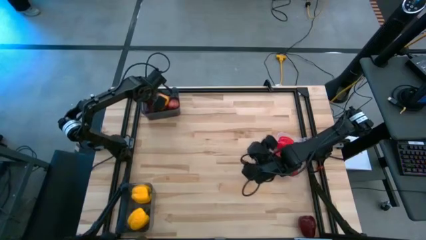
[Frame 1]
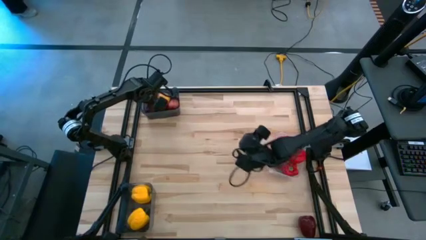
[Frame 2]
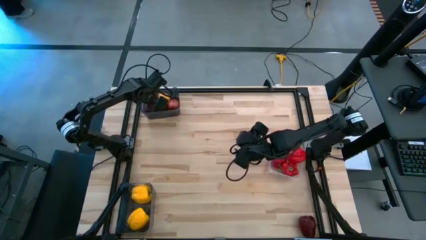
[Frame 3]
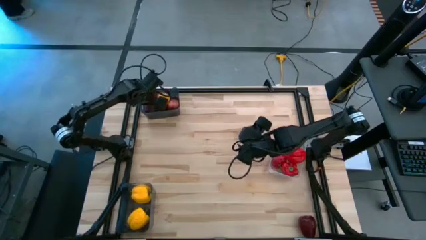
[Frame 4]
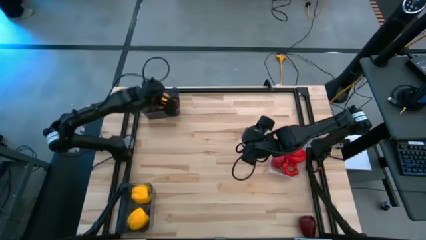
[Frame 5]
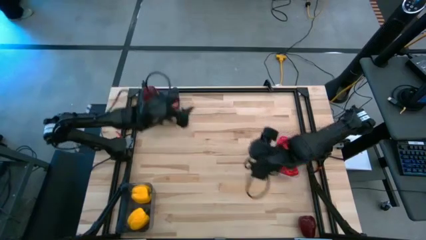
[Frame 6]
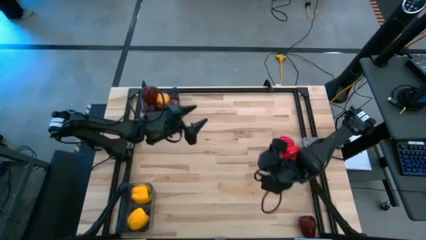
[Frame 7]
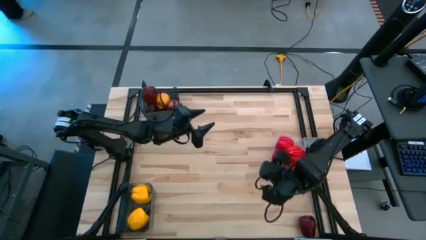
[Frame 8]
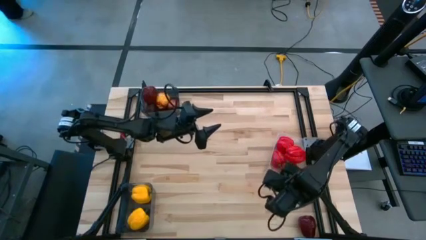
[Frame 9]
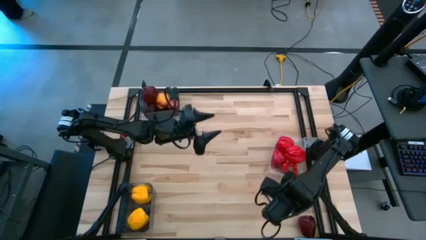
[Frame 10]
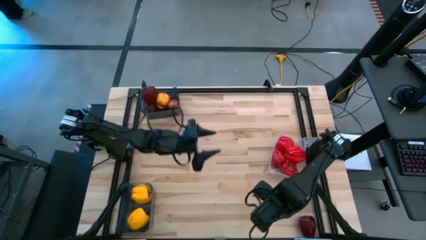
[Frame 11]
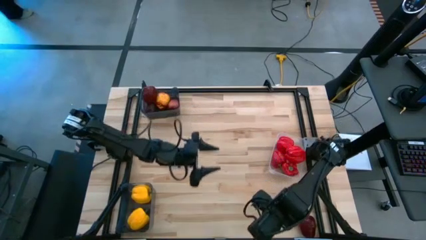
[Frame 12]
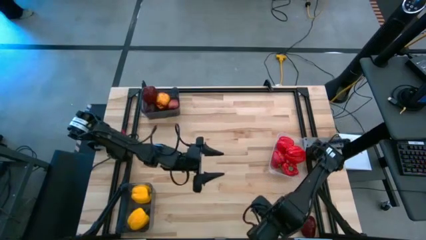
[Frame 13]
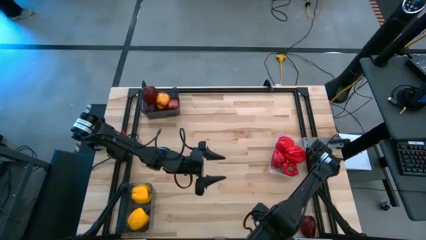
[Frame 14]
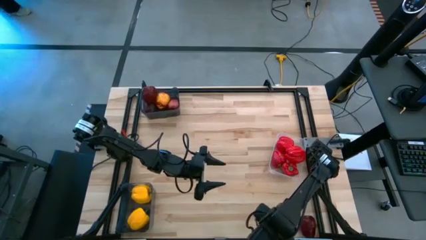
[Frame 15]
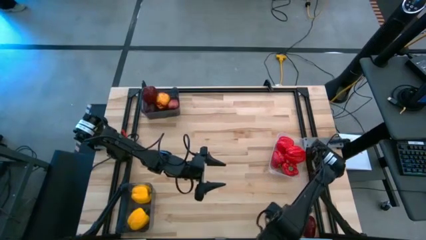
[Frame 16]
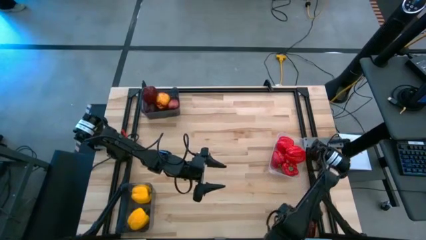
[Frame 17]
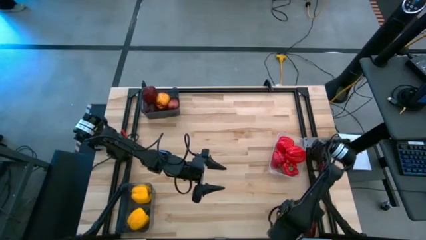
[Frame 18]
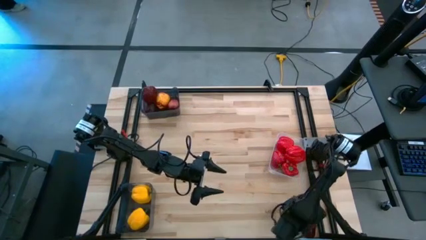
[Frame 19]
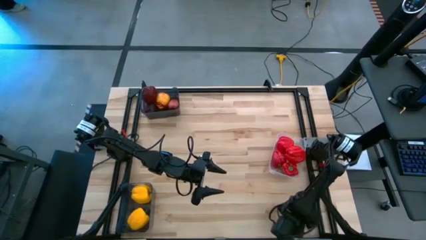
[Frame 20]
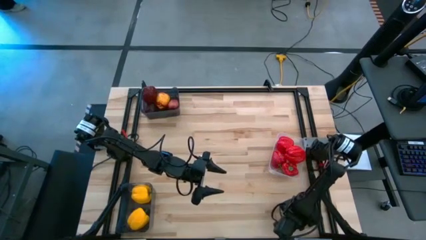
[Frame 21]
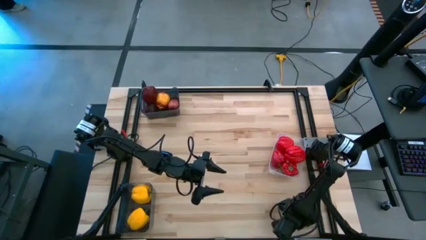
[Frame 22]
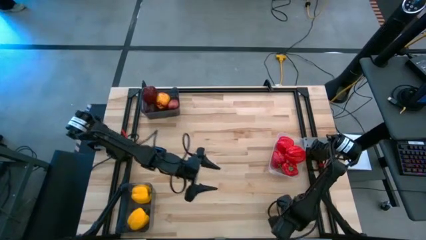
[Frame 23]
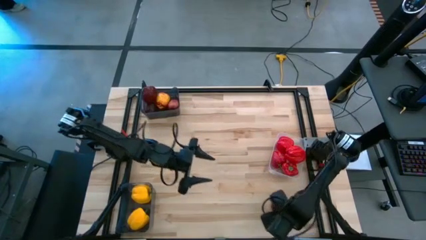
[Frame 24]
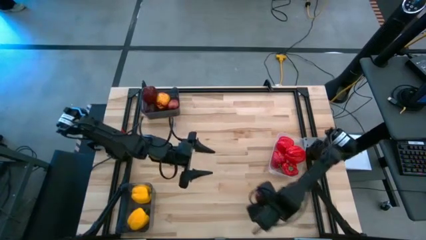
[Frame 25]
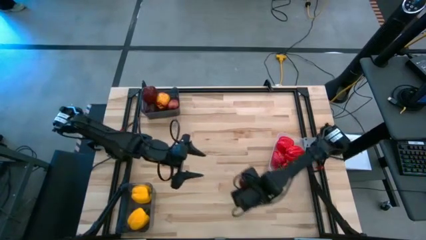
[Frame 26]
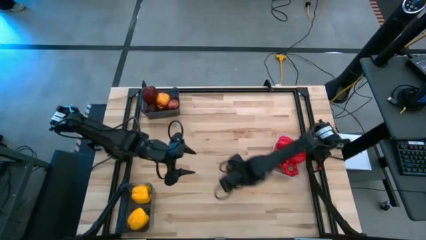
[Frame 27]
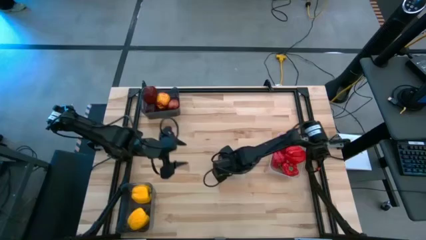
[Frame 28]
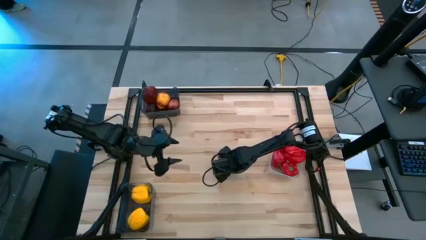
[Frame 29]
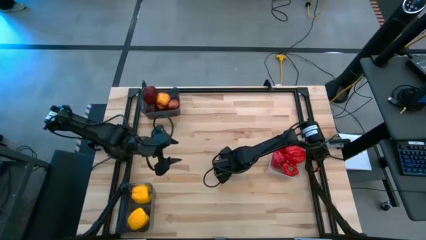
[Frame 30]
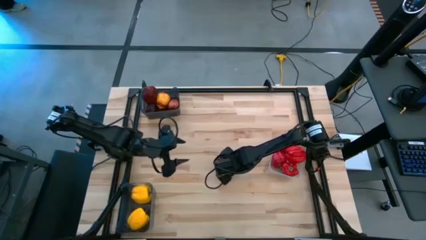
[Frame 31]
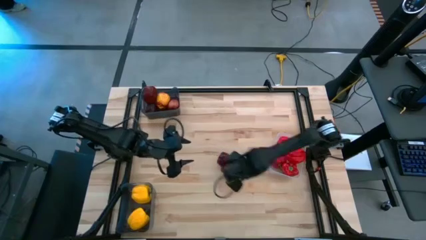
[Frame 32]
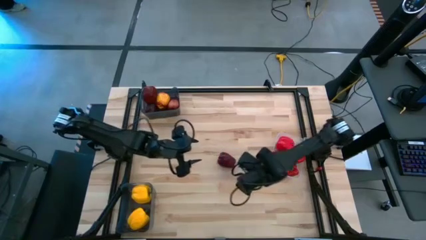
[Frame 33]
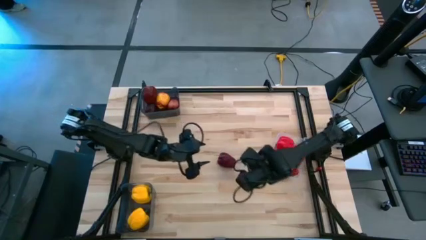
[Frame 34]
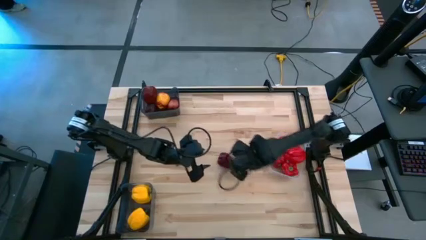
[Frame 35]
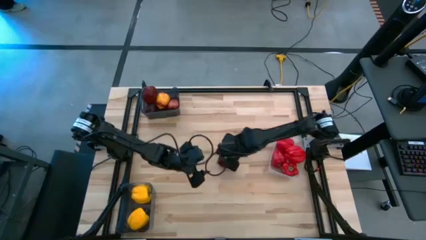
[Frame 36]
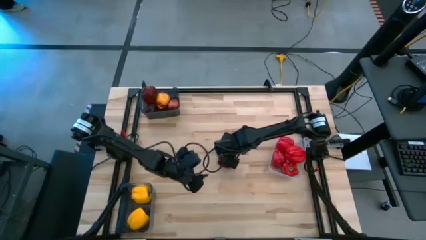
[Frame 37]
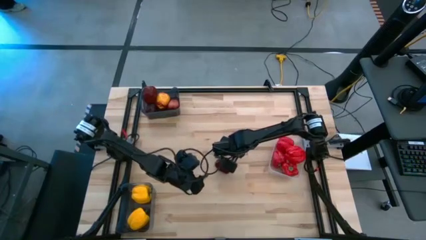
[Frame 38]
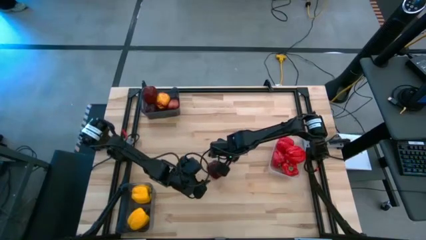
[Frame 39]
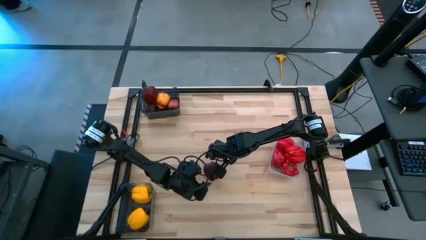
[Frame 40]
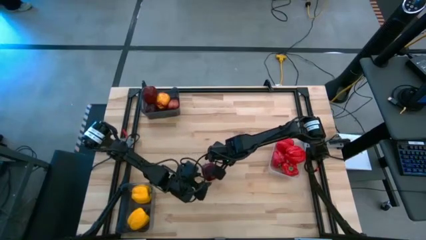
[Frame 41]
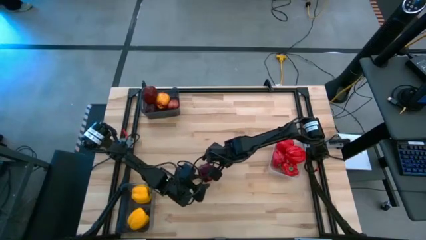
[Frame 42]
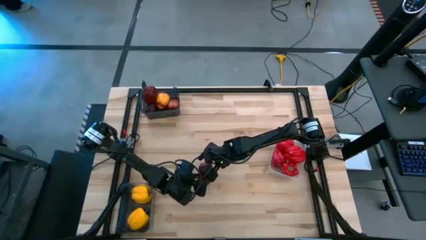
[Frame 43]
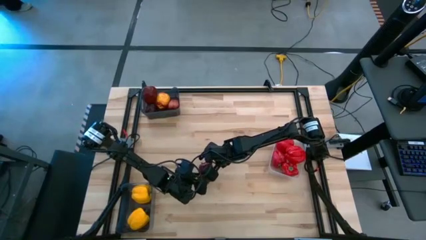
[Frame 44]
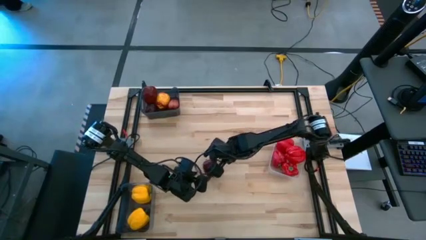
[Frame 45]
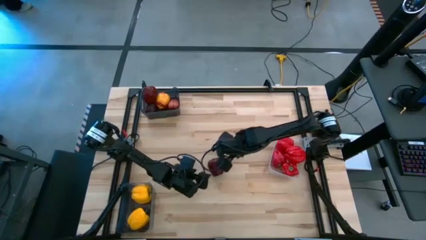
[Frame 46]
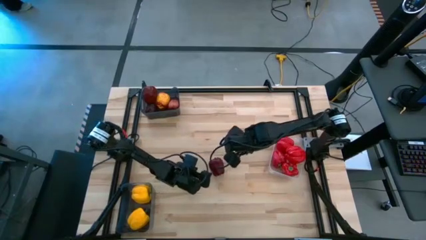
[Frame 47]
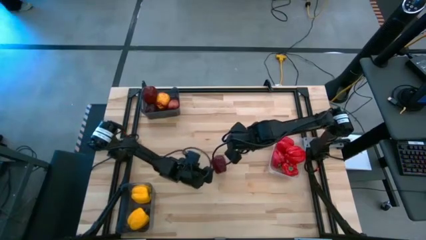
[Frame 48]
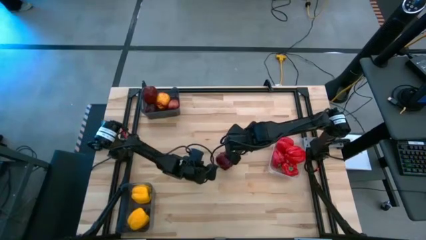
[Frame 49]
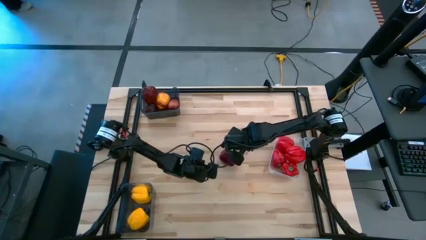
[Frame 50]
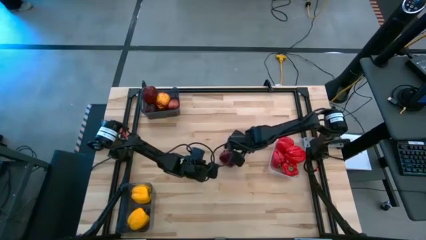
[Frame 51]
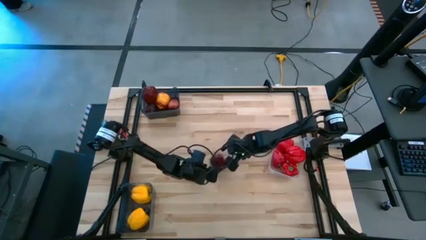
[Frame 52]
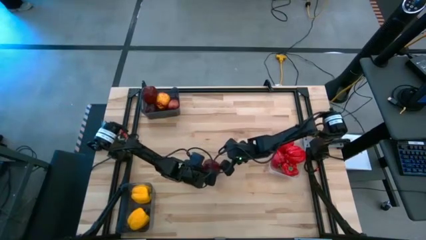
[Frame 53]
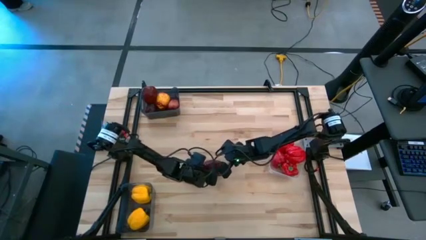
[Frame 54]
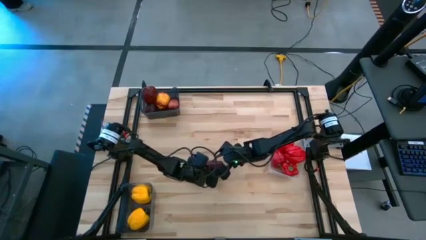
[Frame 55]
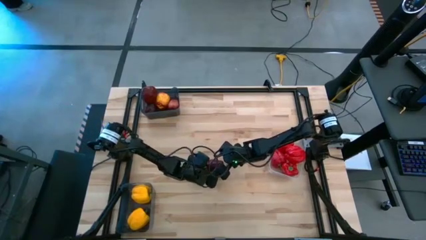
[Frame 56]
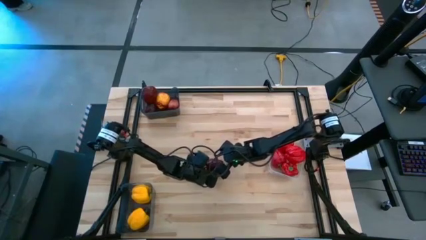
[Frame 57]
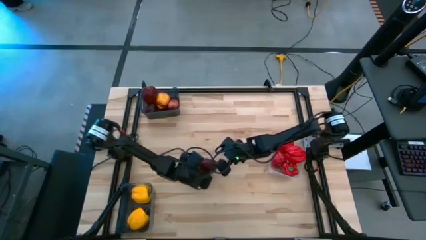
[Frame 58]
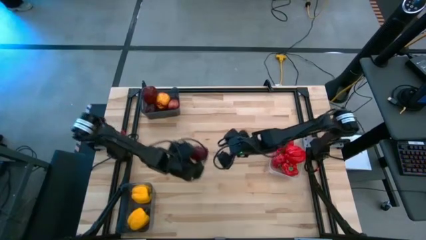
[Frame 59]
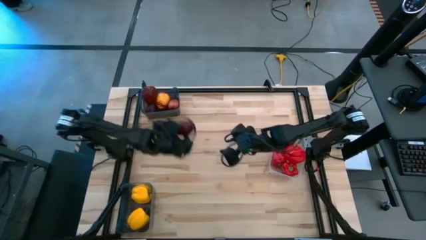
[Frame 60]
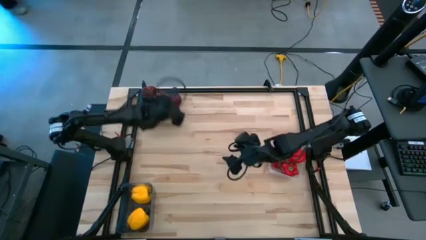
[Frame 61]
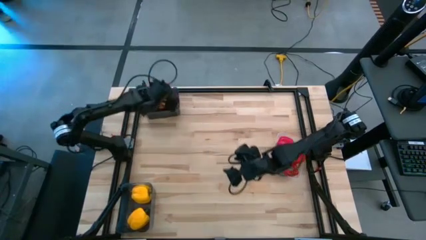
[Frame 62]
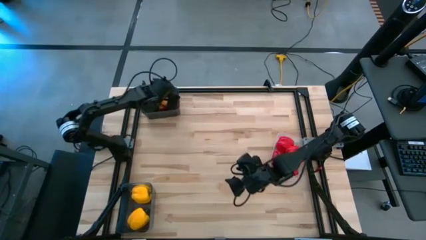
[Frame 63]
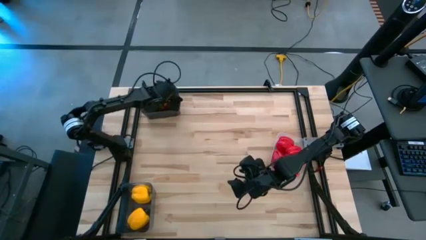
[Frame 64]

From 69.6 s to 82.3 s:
Task: Sort produce into baskets
Put the apple into the top black bin
